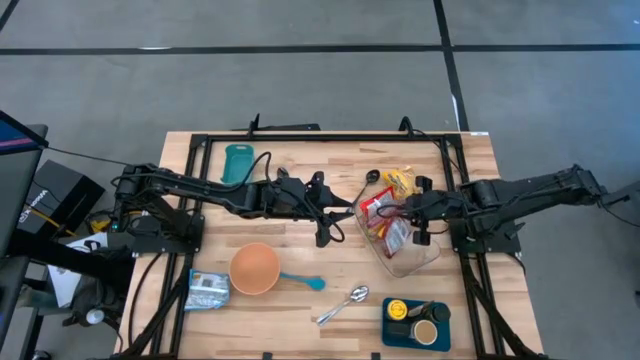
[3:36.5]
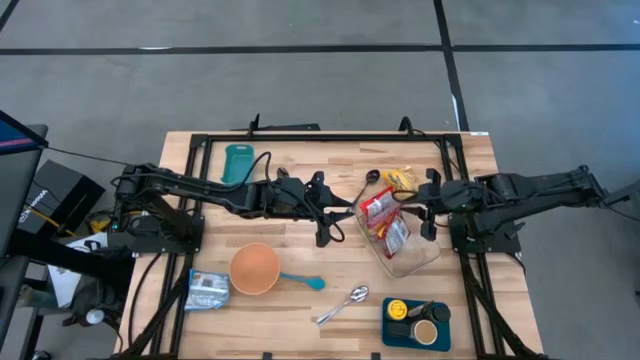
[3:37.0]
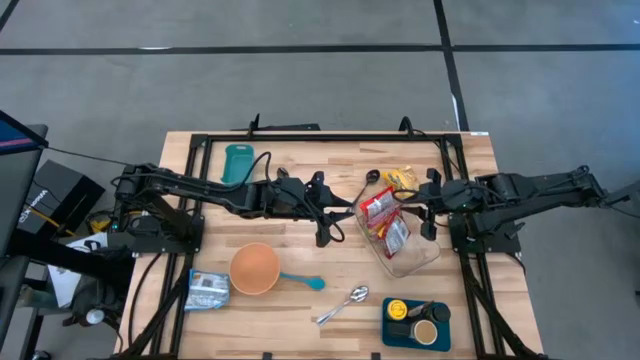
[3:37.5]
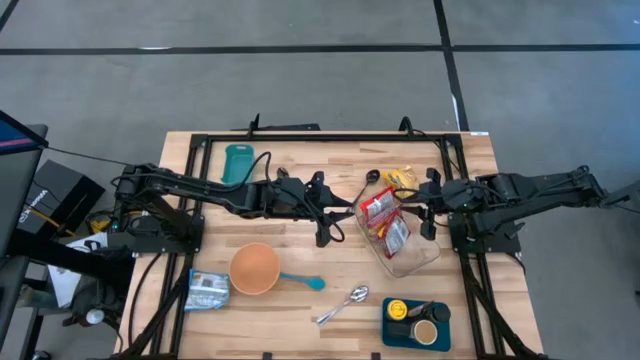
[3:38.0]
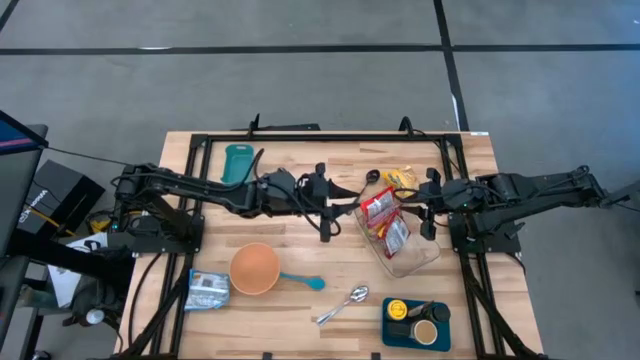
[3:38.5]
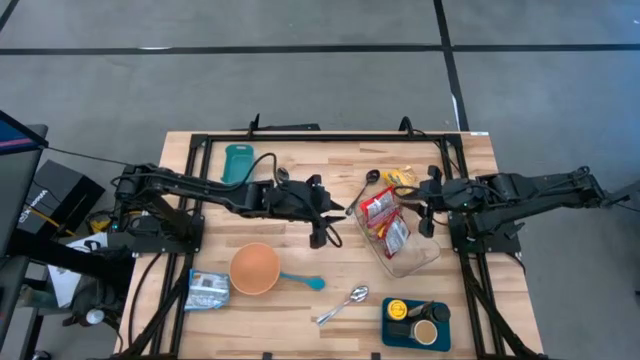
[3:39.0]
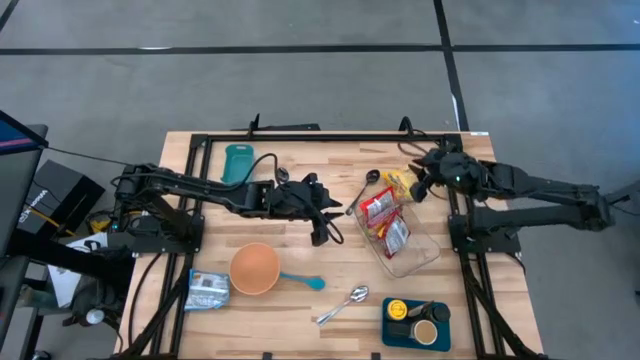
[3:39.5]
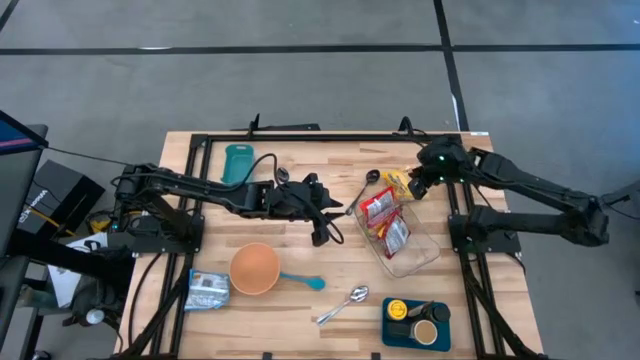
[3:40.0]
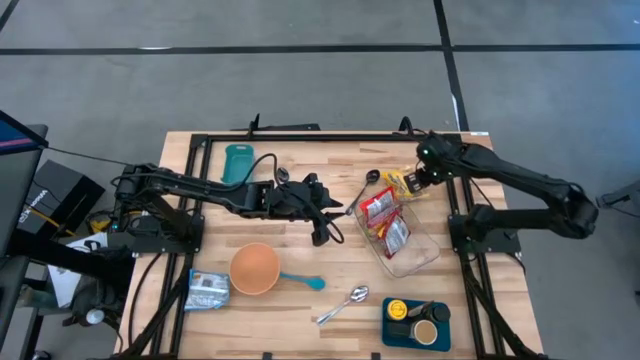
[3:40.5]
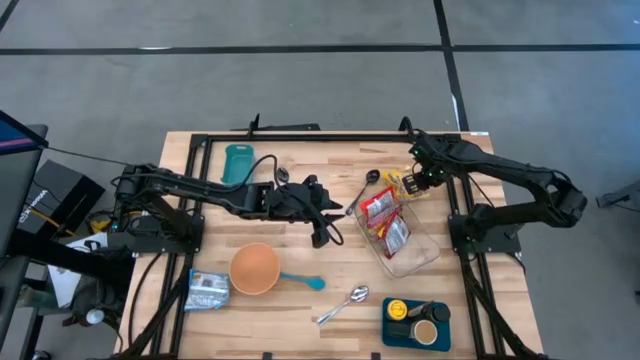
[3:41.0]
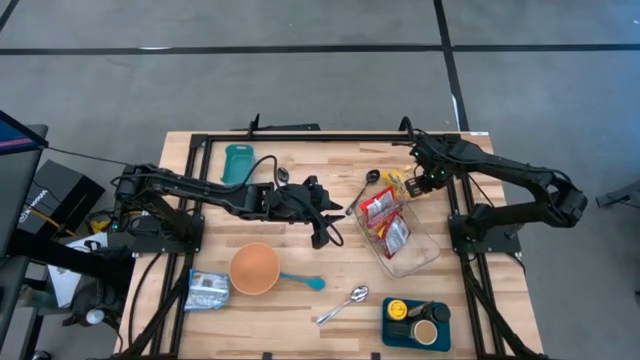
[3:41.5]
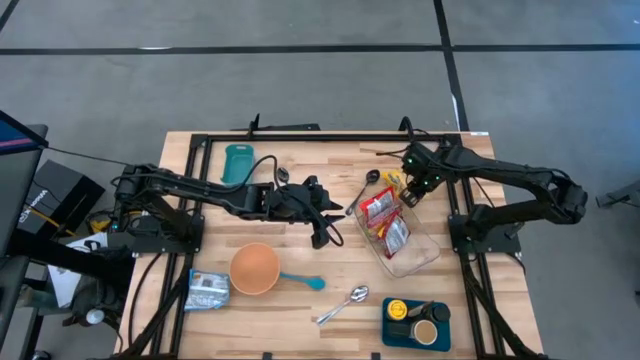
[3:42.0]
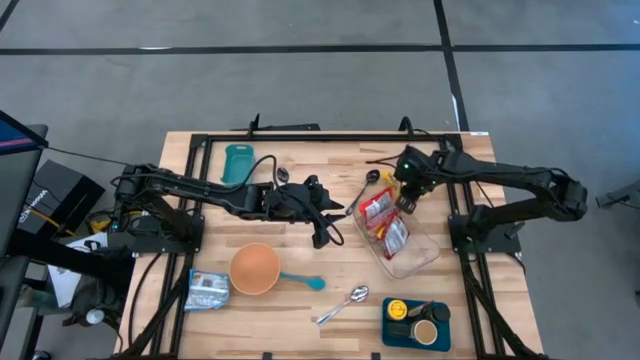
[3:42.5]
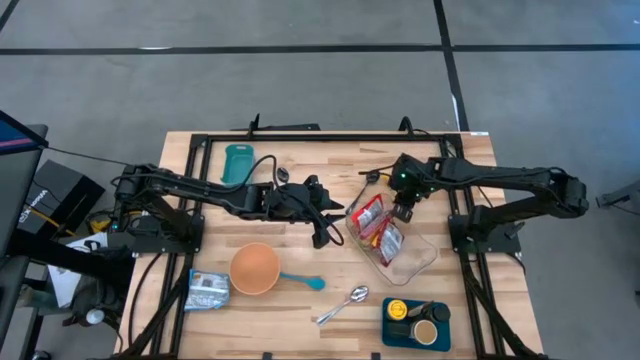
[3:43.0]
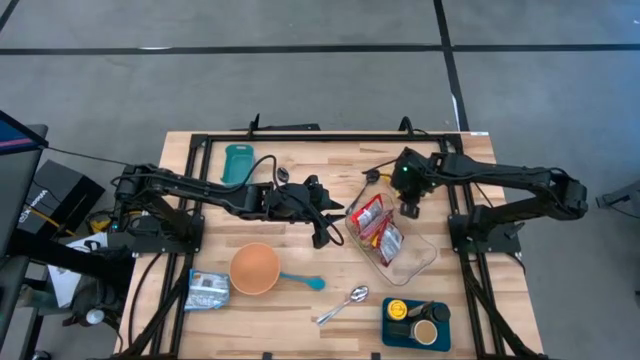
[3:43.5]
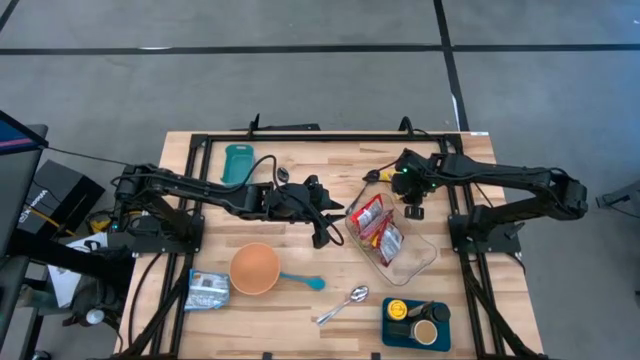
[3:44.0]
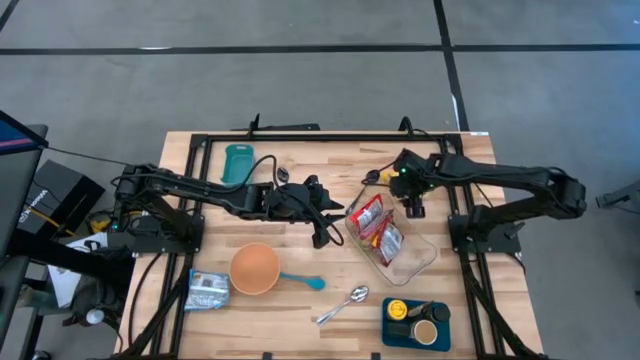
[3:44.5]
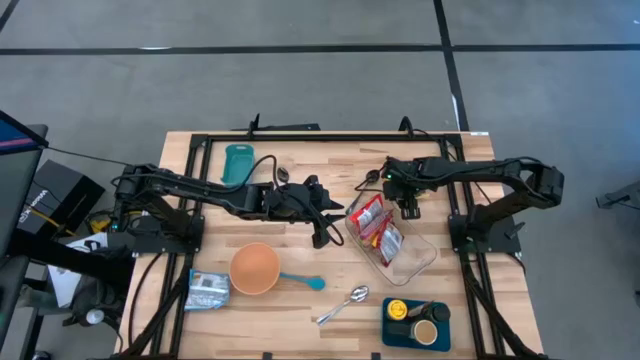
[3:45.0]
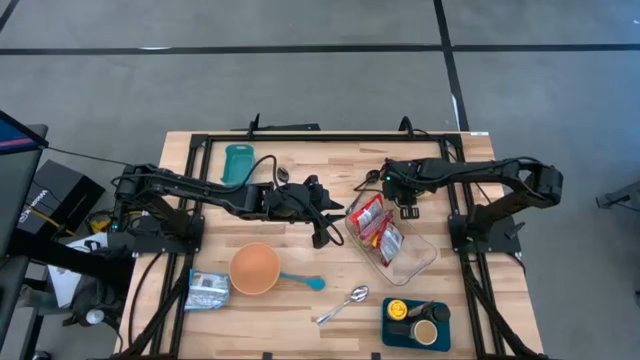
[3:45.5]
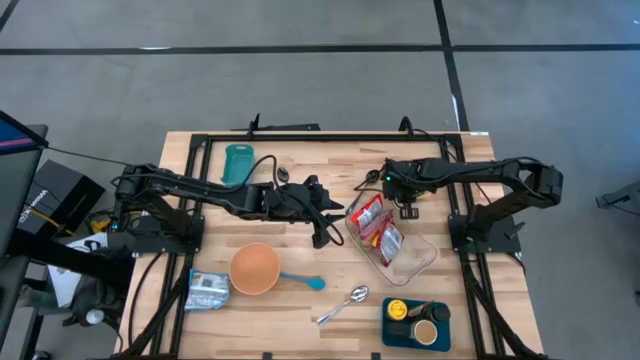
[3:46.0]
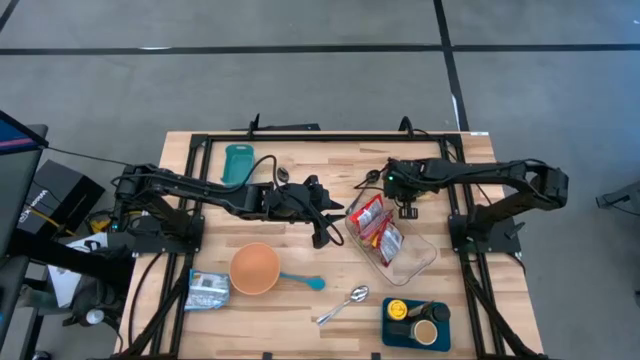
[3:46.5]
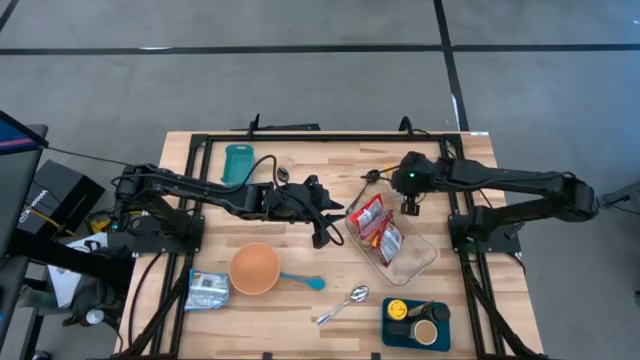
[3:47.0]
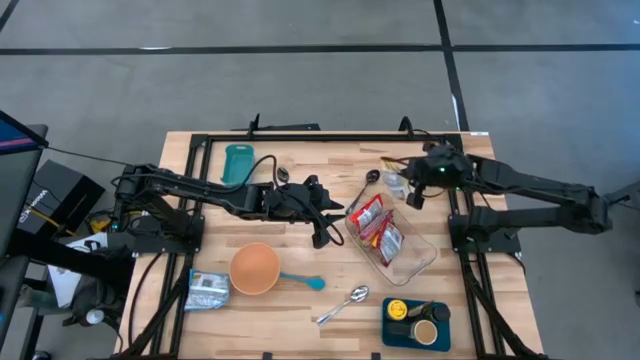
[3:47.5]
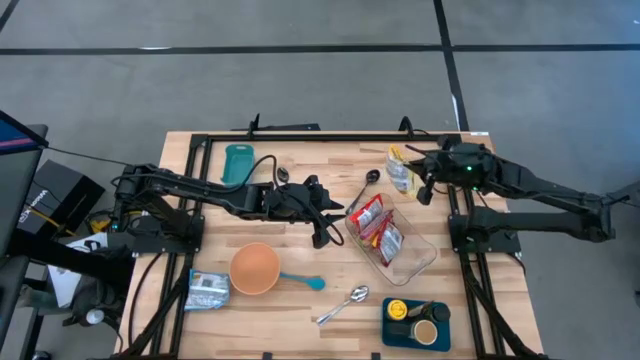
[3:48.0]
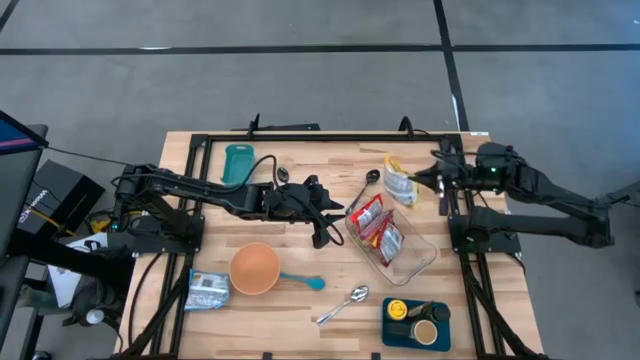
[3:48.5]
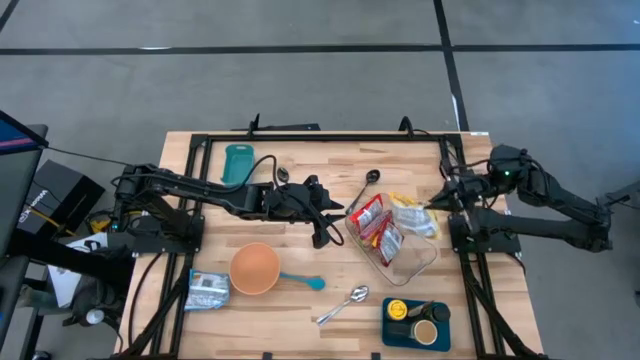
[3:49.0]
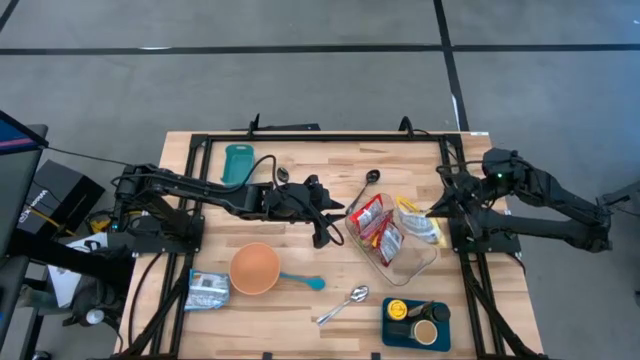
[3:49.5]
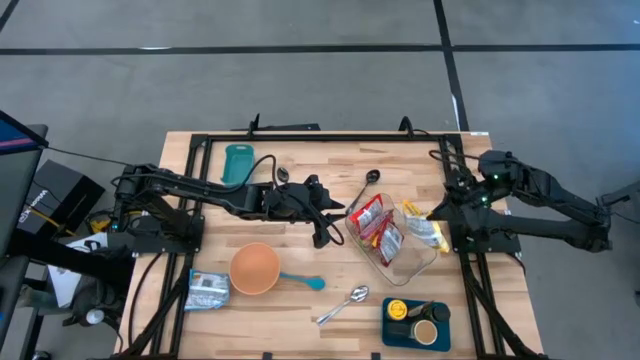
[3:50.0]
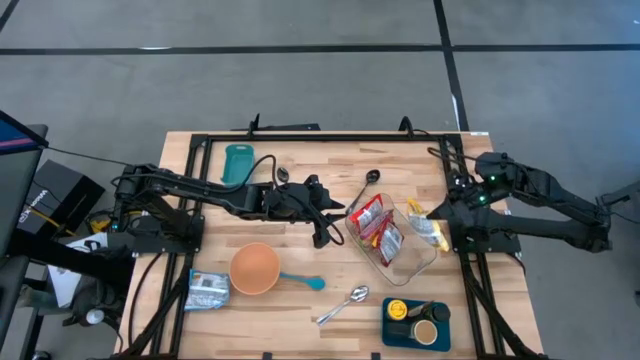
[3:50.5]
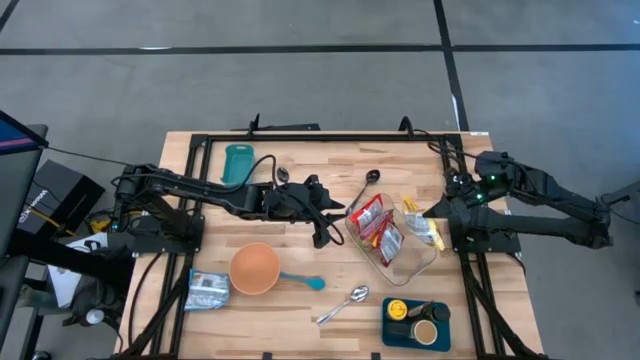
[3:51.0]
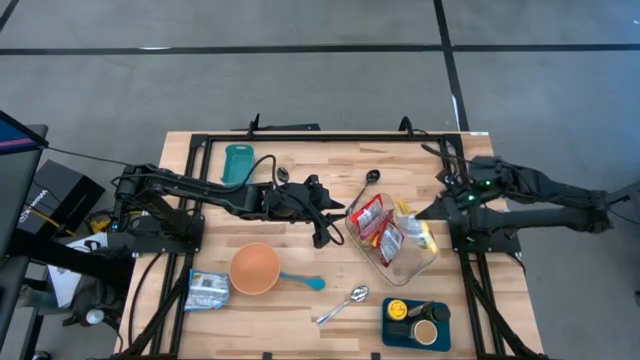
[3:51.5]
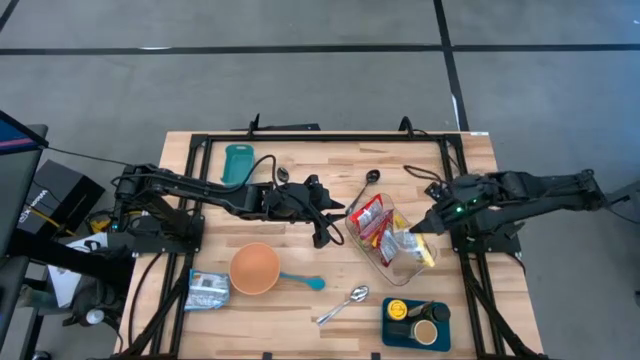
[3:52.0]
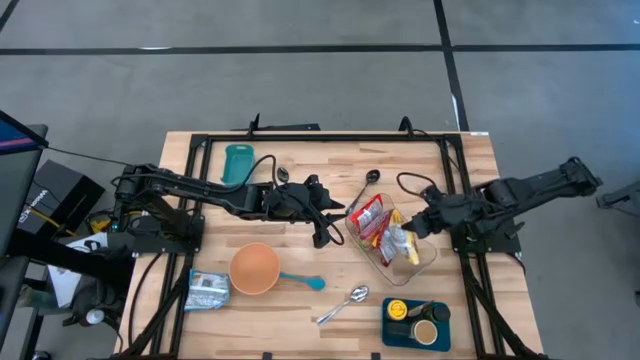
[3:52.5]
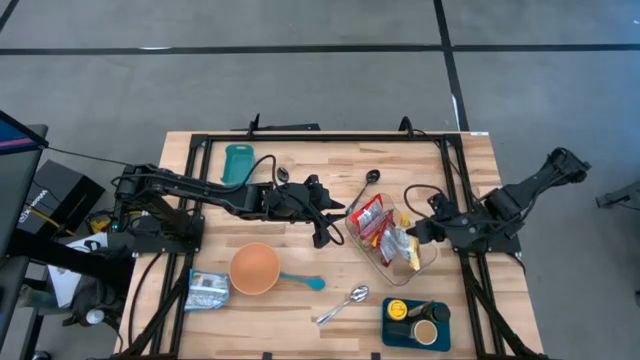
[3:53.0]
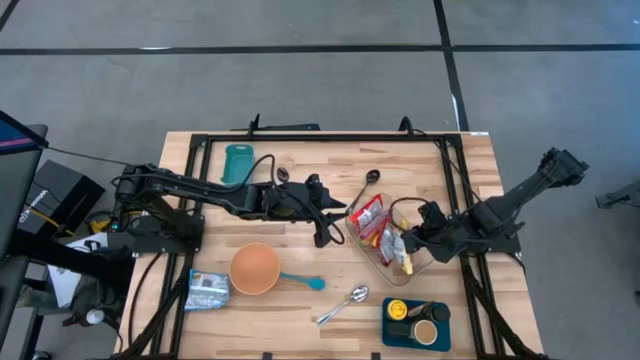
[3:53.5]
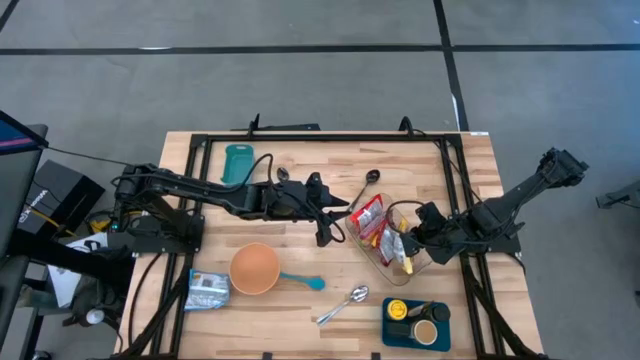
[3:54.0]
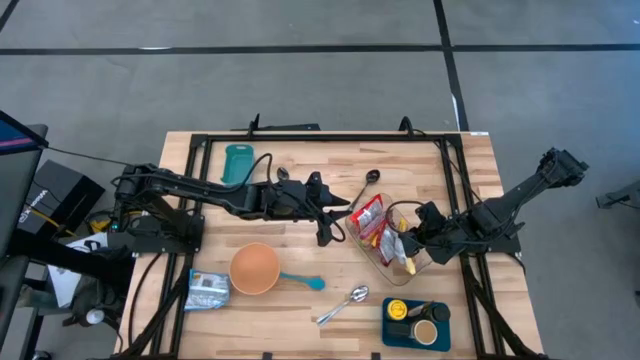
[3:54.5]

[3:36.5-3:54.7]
Task: Pick & Place Food Item
Put the yellow noodle pack into the transparent bin

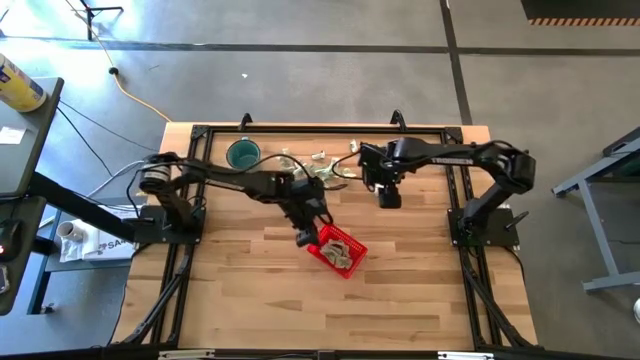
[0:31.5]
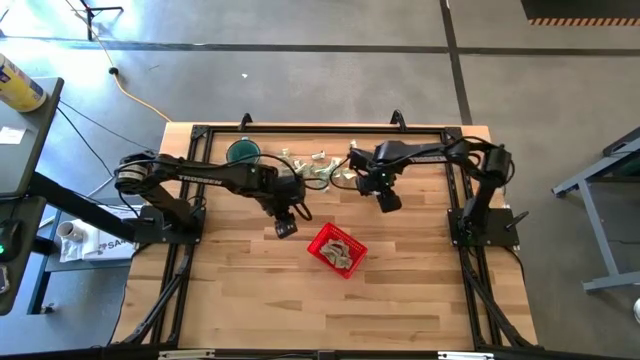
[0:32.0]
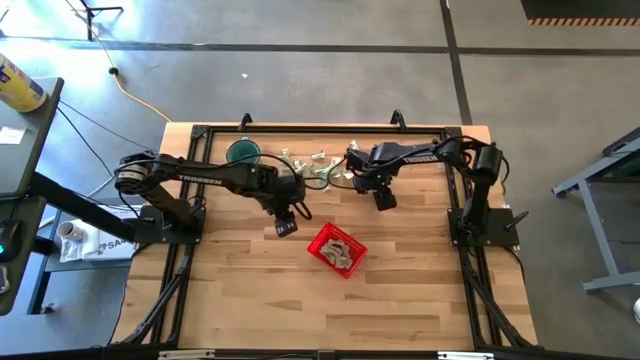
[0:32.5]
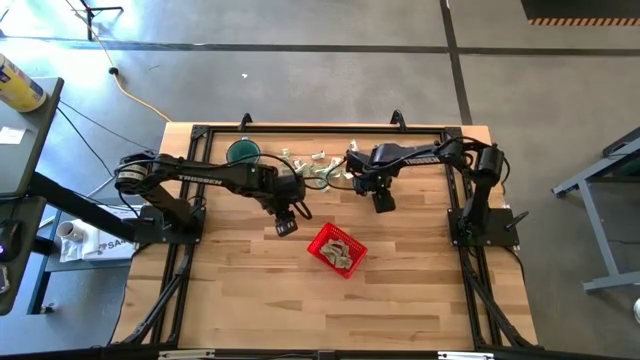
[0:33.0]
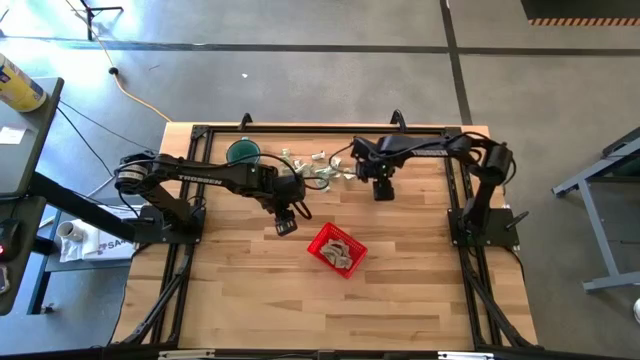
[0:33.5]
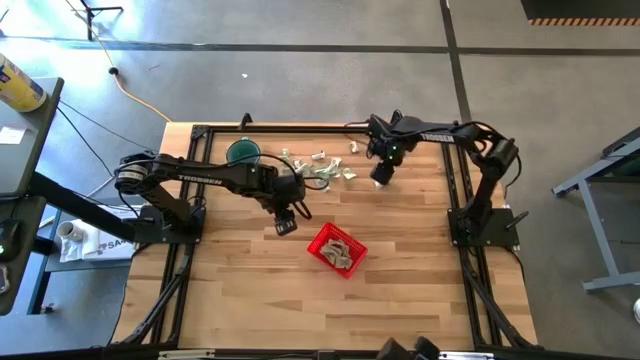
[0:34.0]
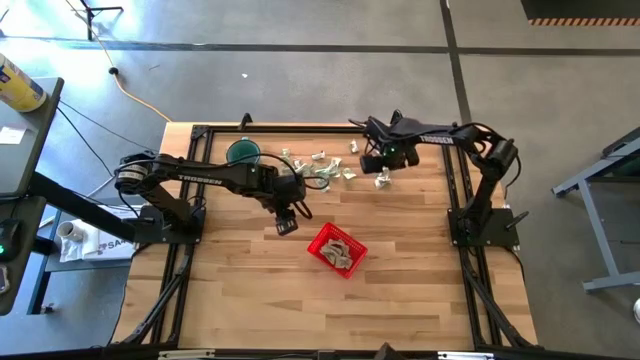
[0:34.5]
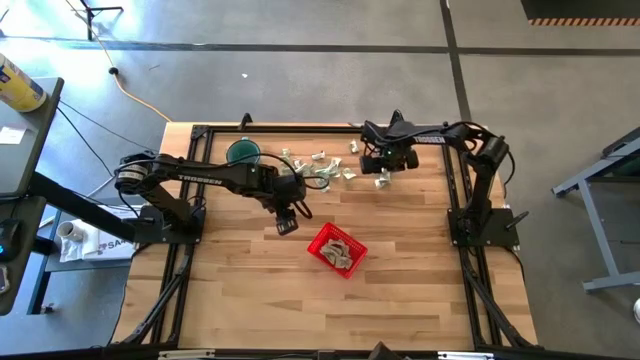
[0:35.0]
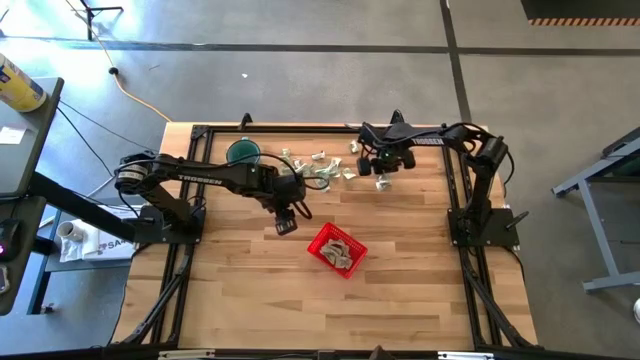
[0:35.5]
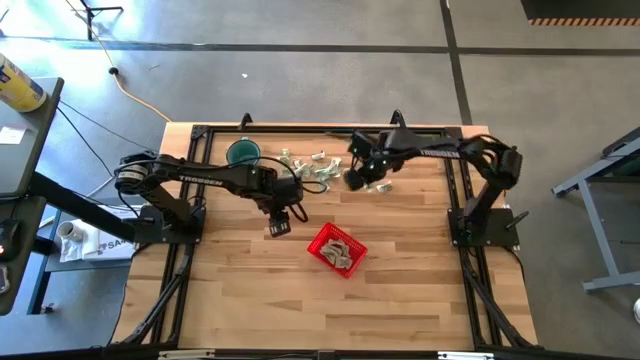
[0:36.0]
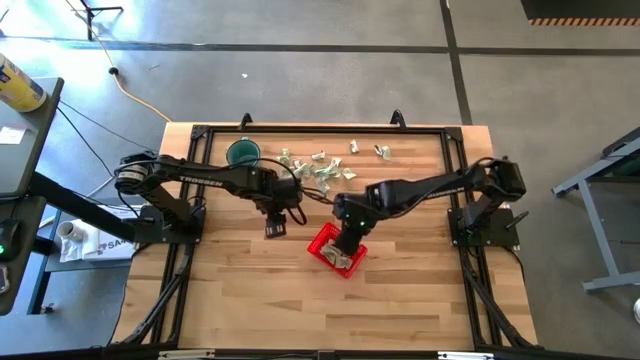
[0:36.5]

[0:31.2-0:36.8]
Task: Pick and place Stevia / Truvia into bins
Put the light green stevia packet into the bin
